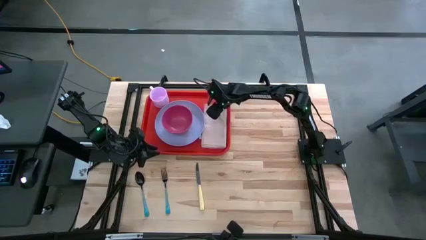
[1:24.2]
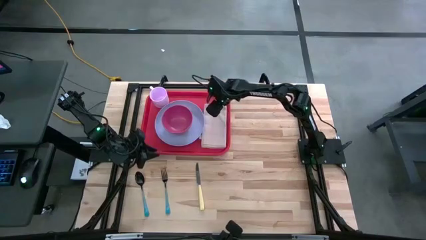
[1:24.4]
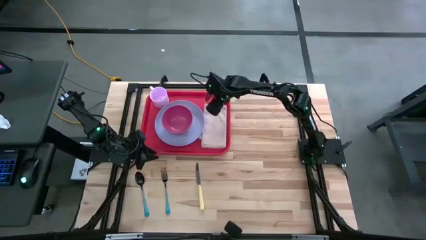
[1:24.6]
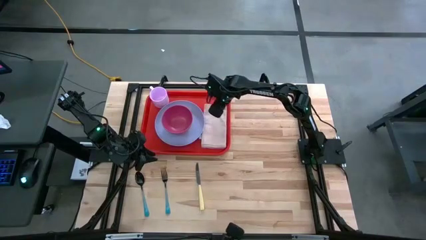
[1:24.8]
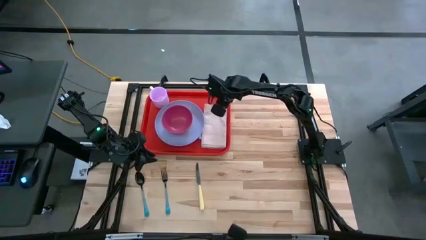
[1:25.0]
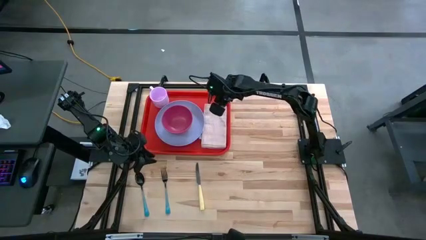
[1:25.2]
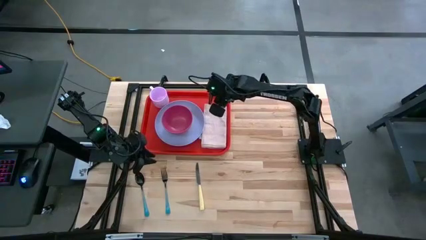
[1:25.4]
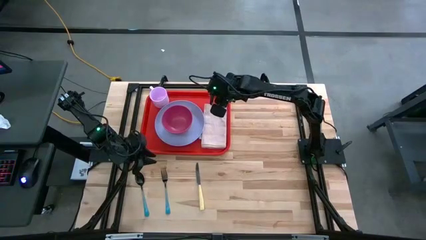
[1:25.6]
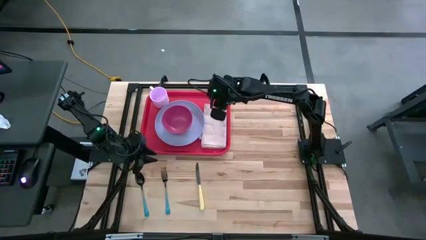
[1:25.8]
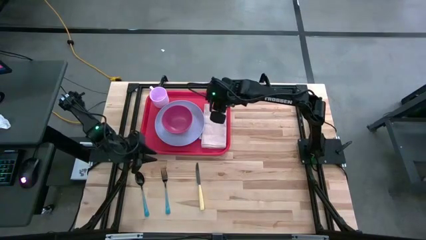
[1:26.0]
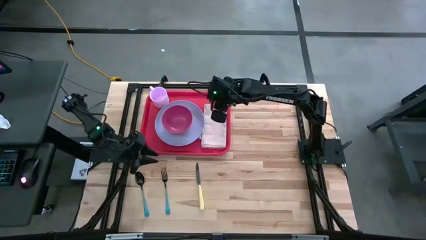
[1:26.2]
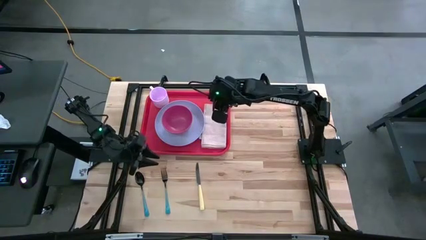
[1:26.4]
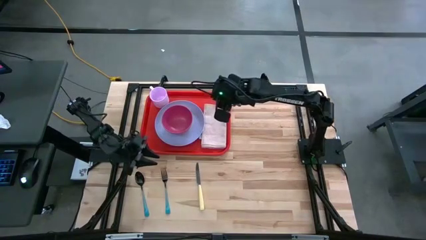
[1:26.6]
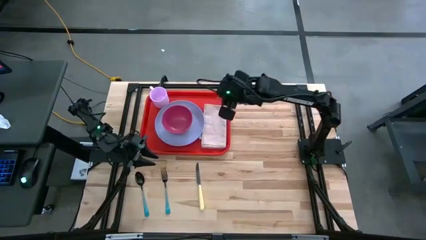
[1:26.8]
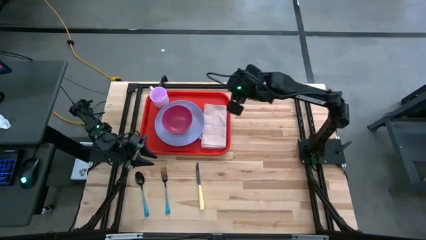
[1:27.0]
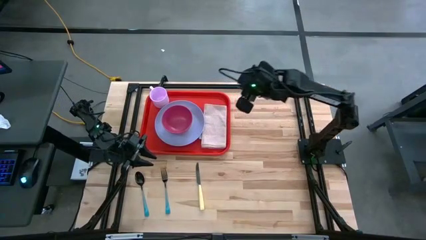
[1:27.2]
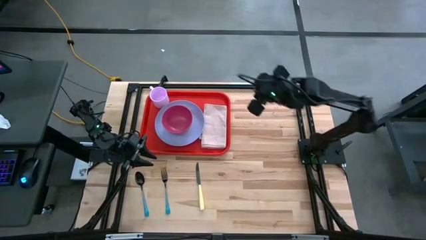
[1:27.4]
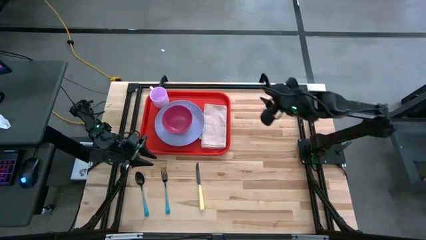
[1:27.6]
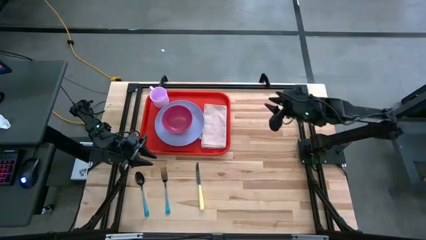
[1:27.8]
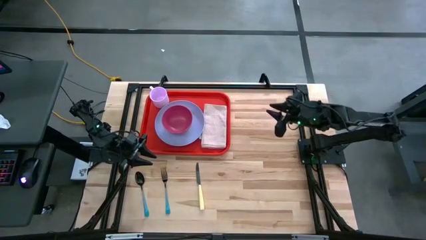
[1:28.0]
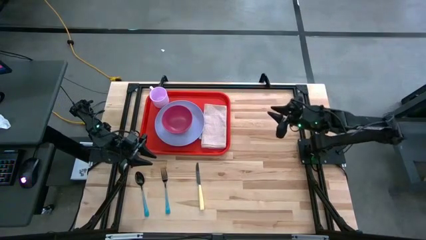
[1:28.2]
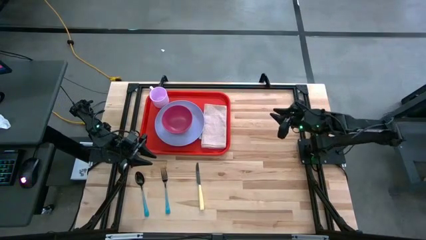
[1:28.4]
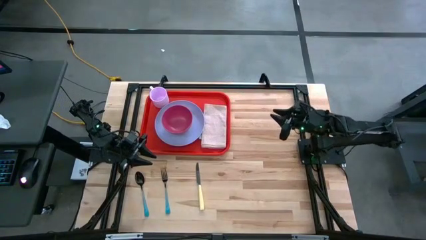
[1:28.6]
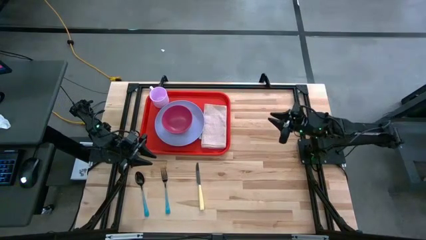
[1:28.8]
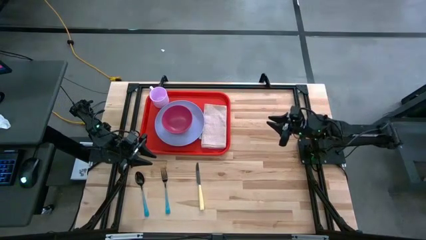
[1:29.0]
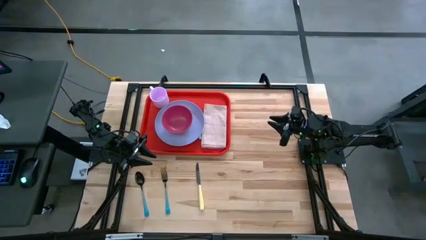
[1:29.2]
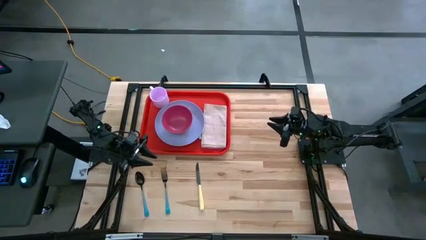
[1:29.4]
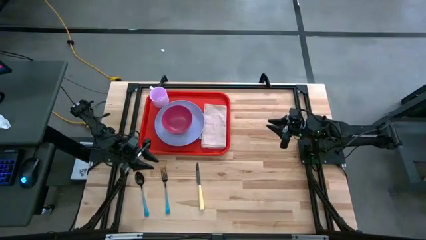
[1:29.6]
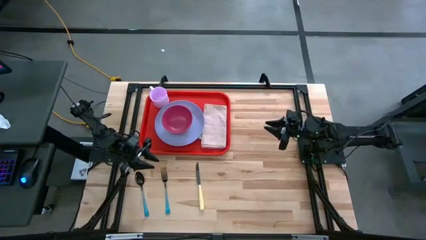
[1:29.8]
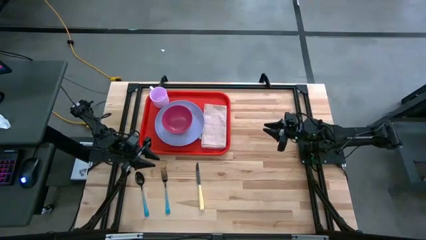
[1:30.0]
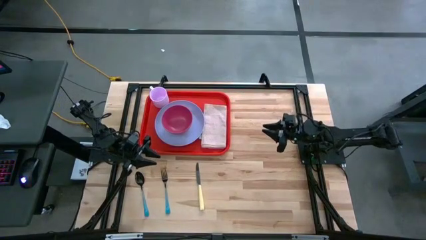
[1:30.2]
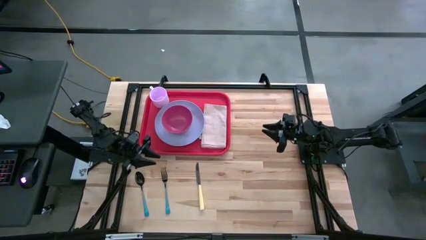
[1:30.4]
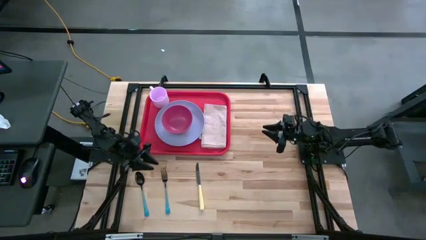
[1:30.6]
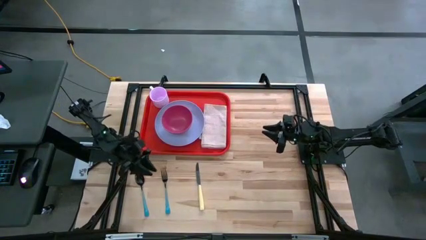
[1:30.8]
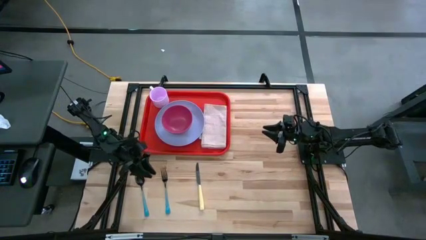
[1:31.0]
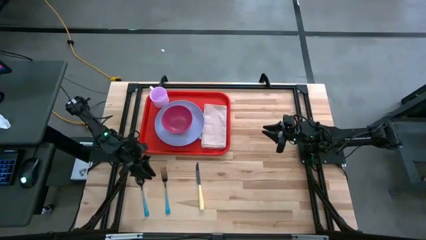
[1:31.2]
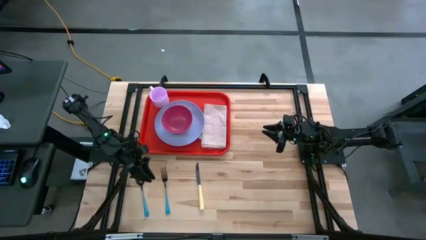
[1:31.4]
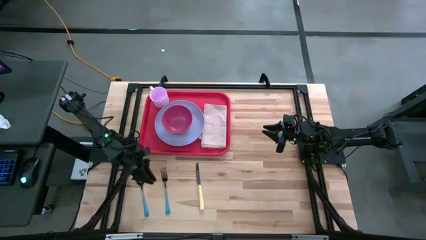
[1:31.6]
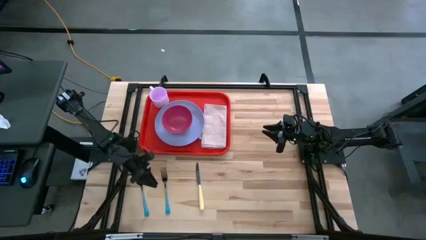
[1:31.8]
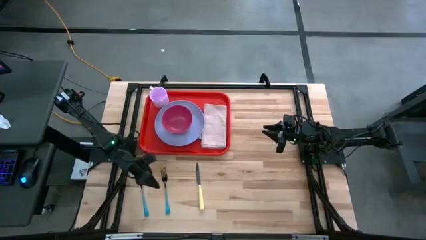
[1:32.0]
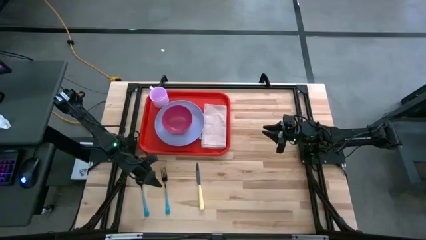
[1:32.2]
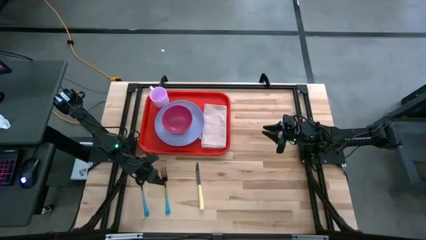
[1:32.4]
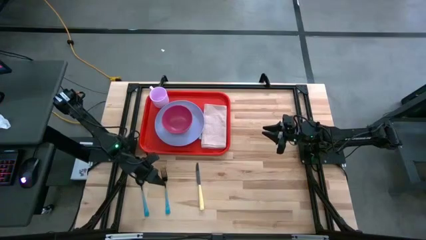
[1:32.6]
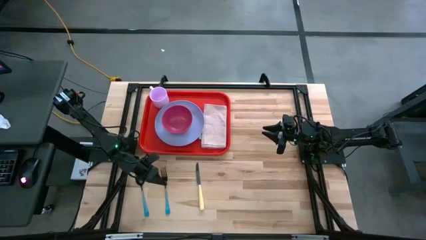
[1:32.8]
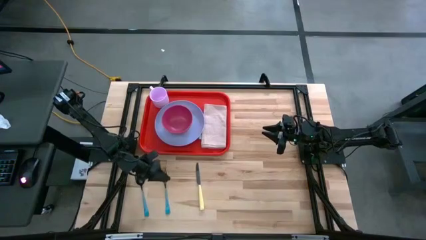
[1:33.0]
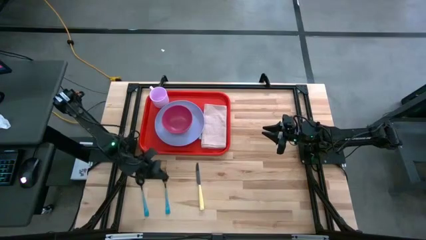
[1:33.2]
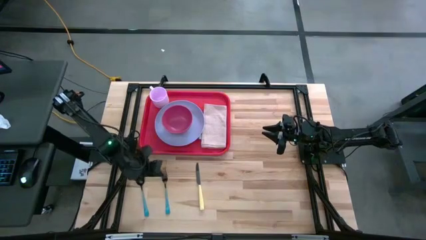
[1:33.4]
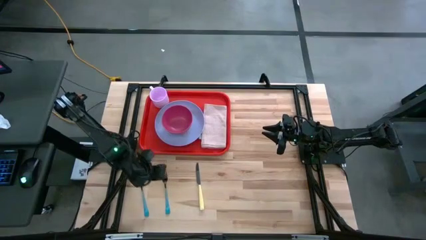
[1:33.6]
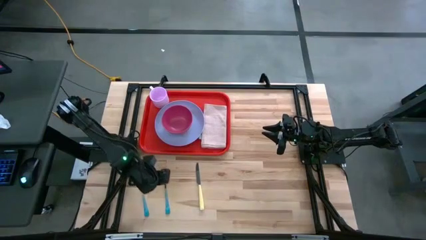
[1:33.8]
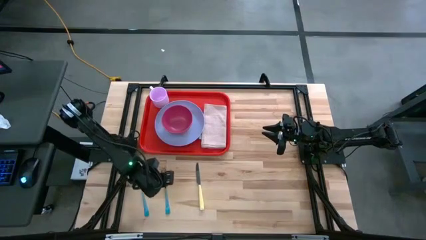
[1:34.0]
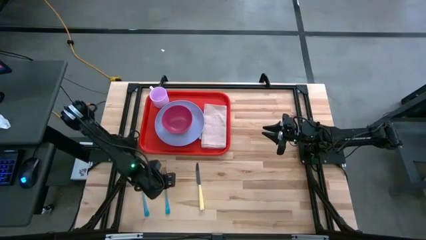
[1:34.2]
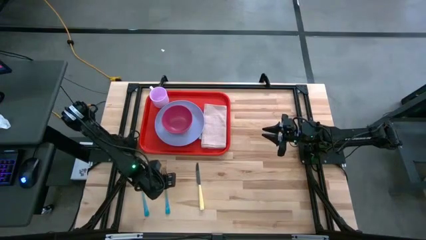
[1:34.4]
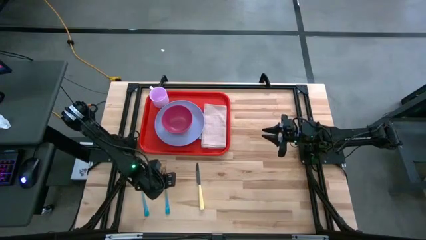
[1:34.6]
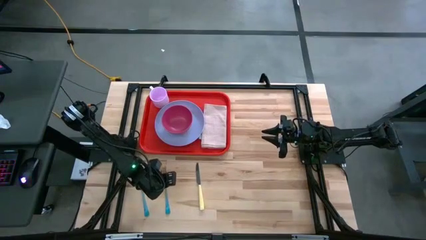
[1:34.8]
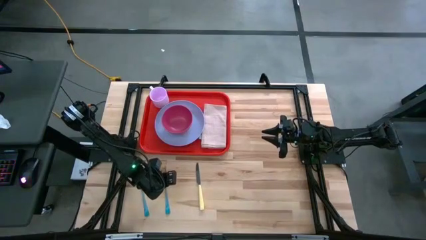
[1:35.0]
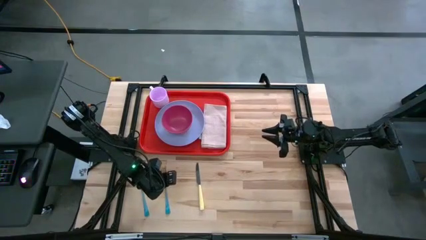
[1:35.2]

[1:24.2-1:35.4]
Task: Set up tray
Put the blue fork on top of the brown napkin on the right side of the violet plate on the red tray
